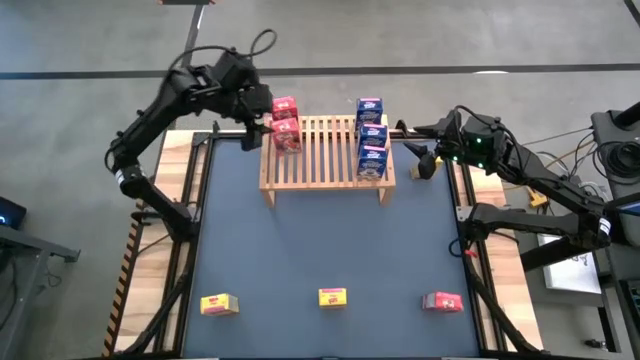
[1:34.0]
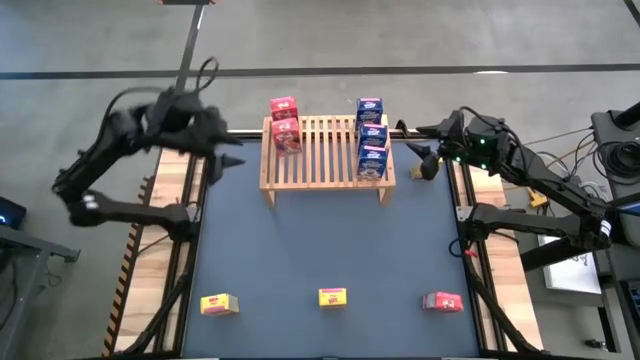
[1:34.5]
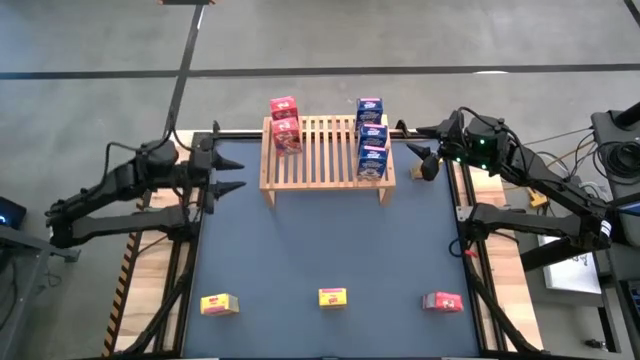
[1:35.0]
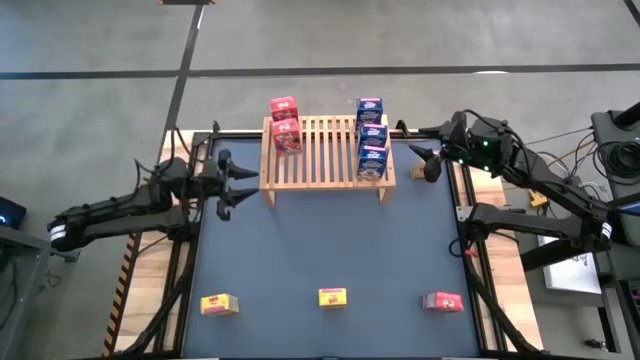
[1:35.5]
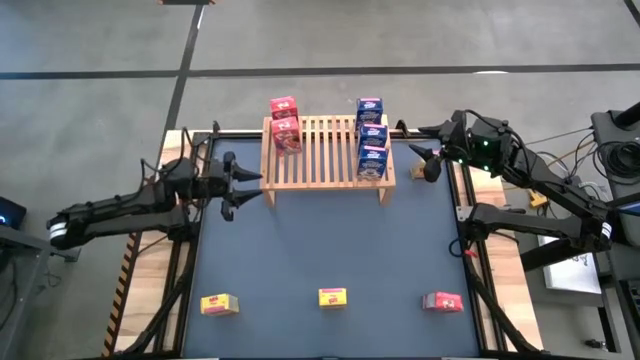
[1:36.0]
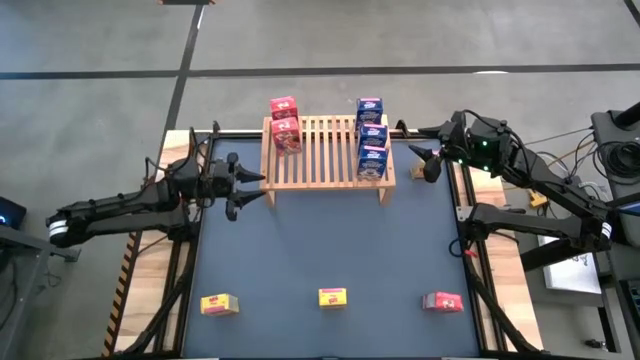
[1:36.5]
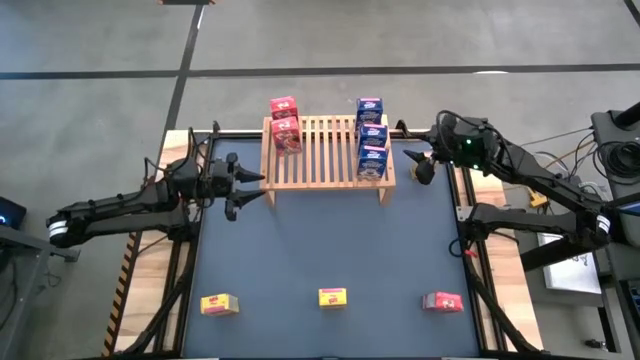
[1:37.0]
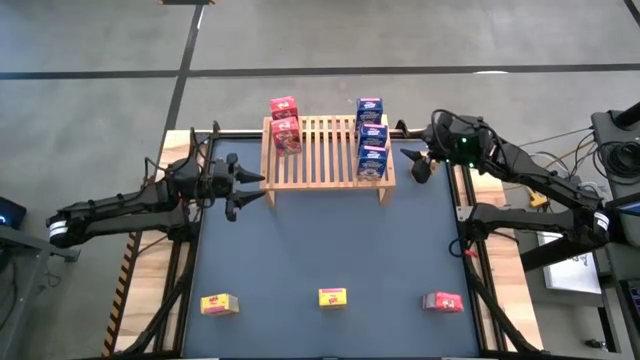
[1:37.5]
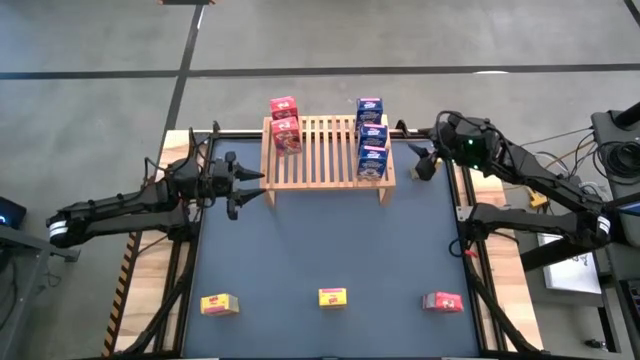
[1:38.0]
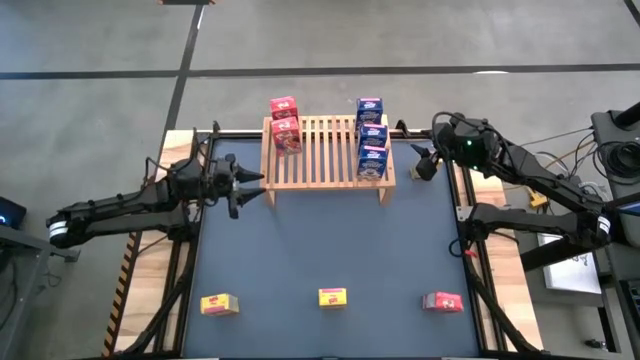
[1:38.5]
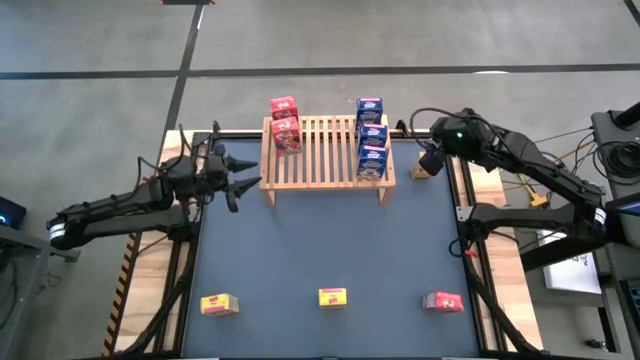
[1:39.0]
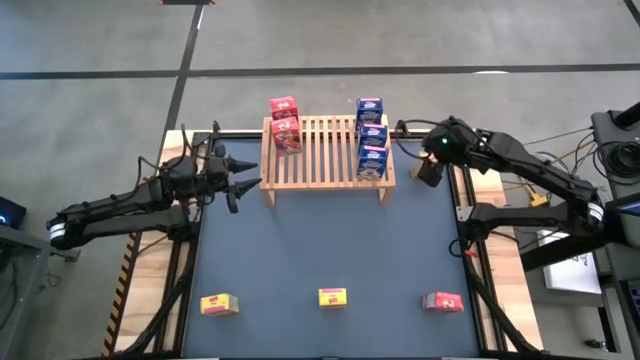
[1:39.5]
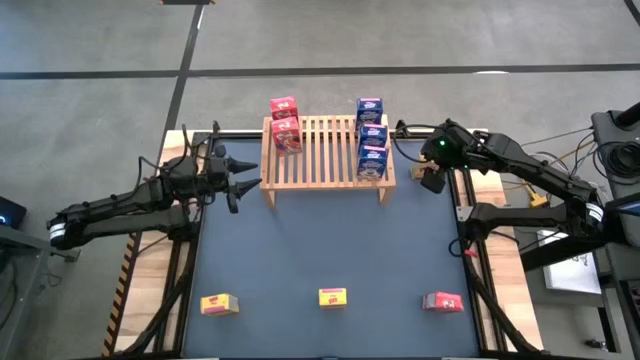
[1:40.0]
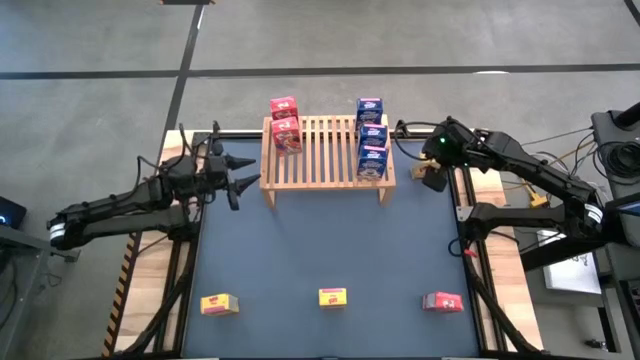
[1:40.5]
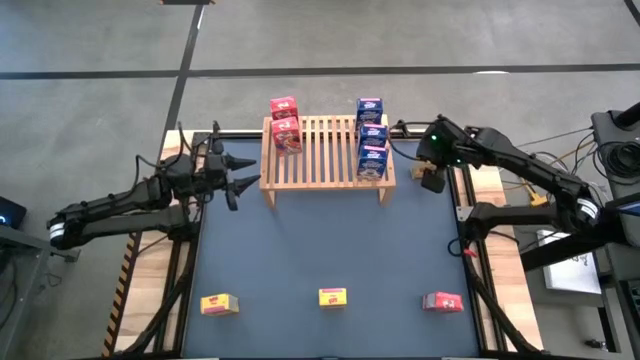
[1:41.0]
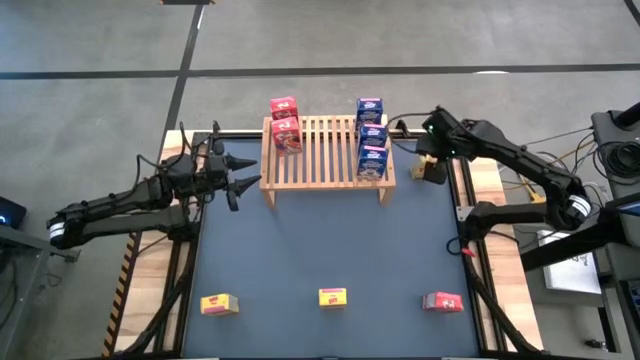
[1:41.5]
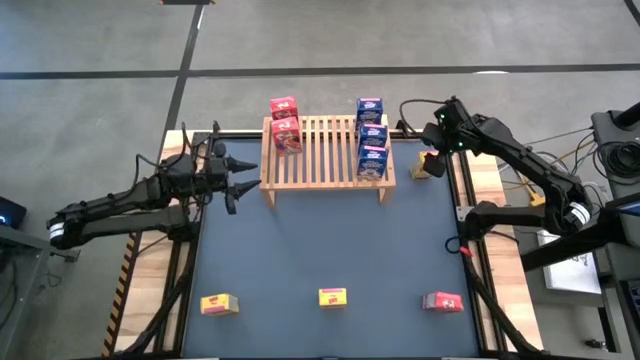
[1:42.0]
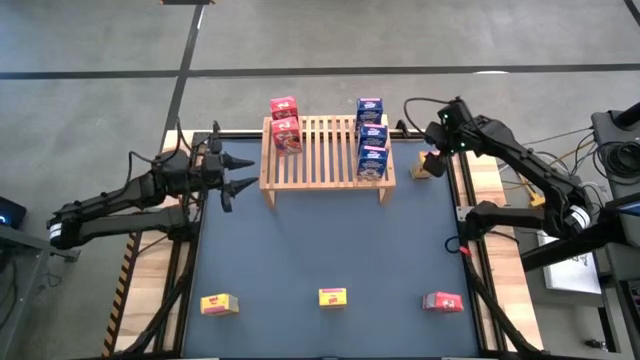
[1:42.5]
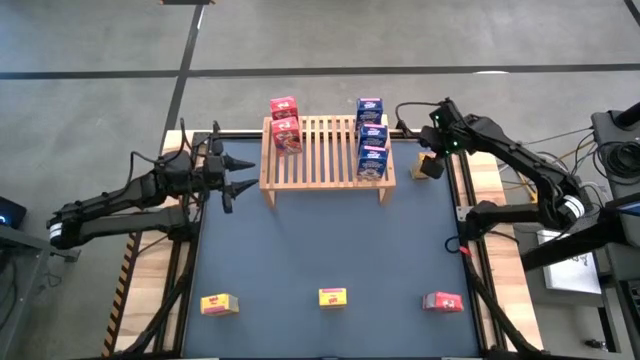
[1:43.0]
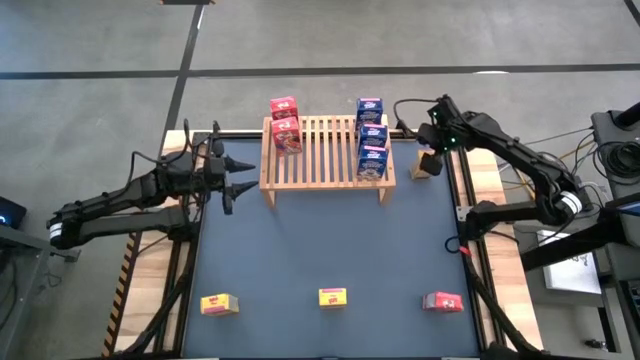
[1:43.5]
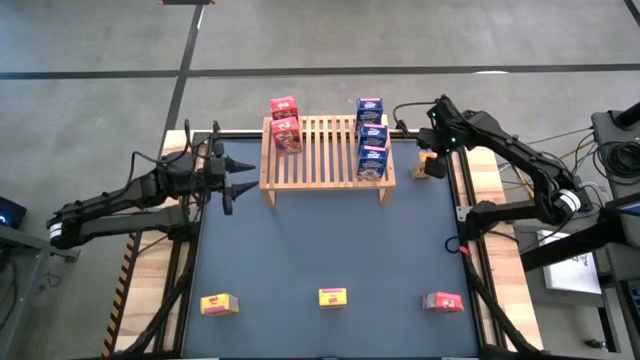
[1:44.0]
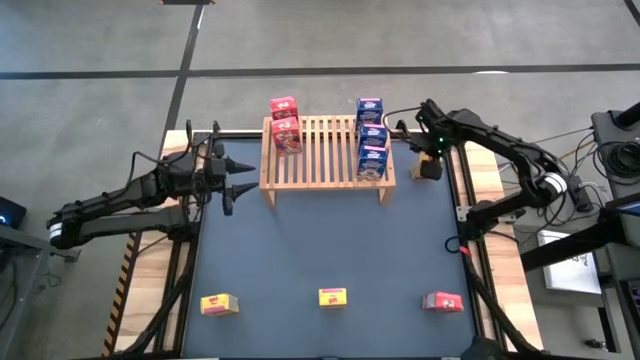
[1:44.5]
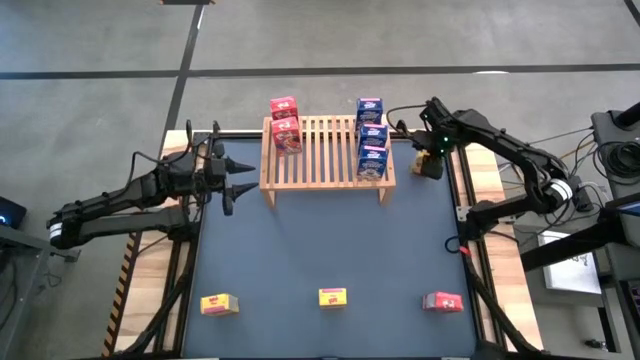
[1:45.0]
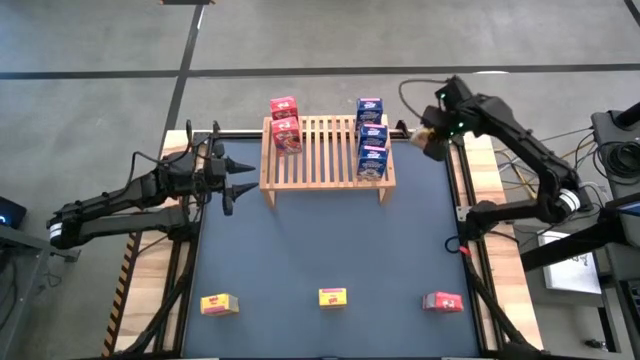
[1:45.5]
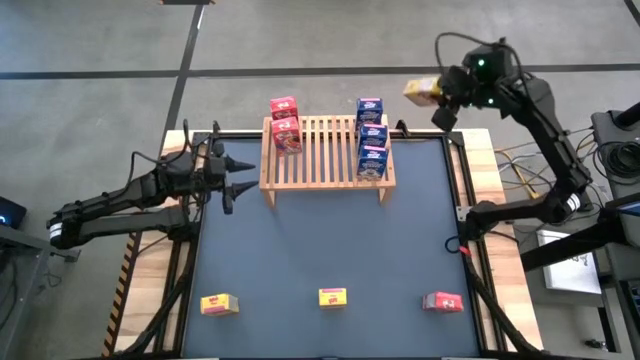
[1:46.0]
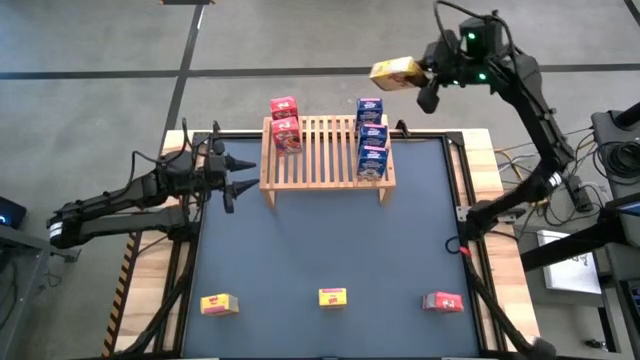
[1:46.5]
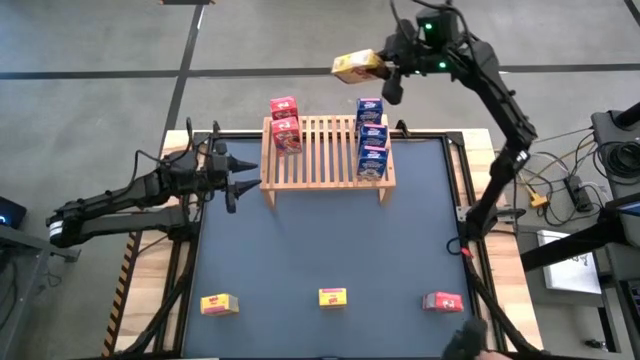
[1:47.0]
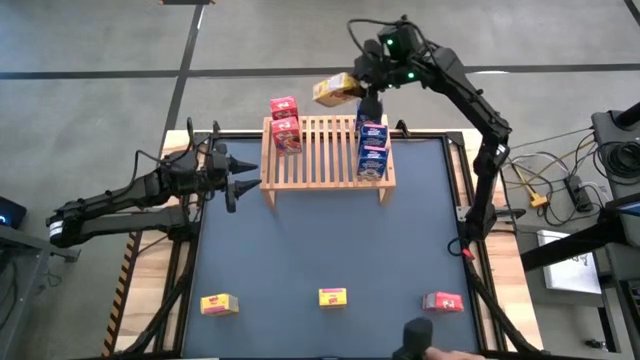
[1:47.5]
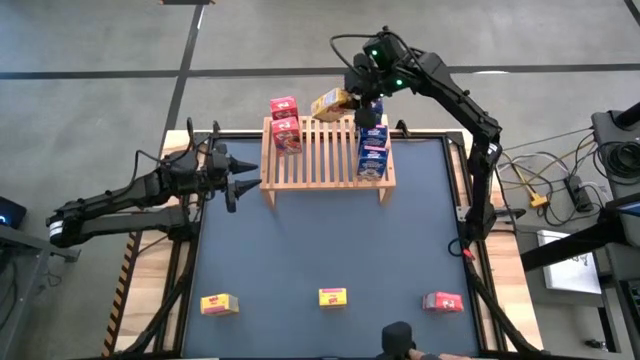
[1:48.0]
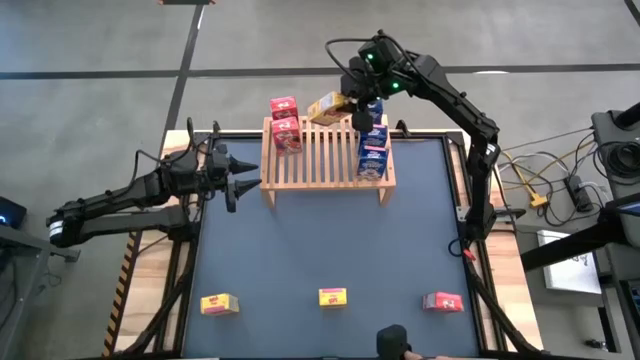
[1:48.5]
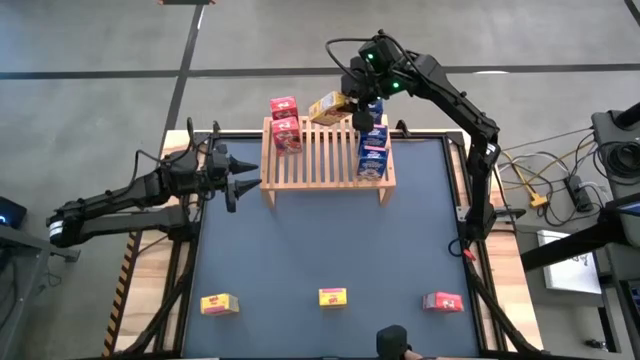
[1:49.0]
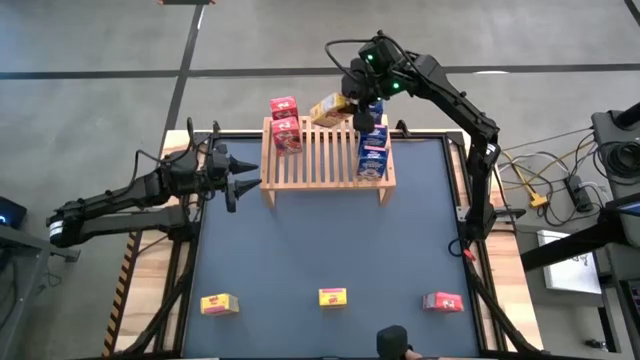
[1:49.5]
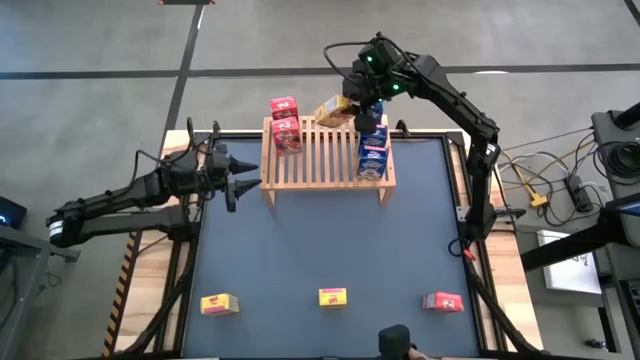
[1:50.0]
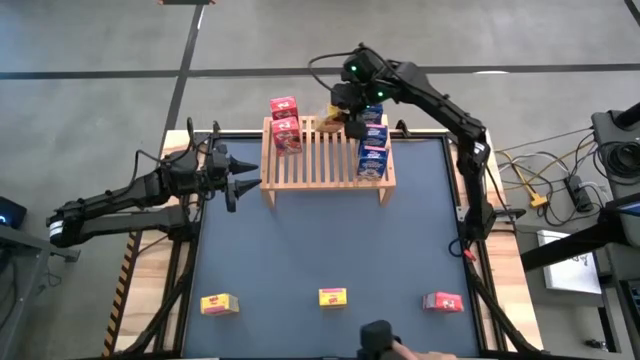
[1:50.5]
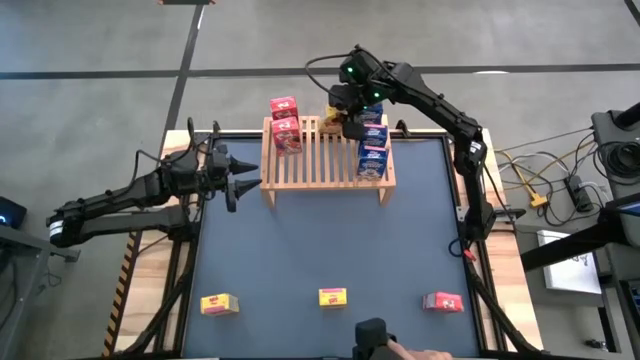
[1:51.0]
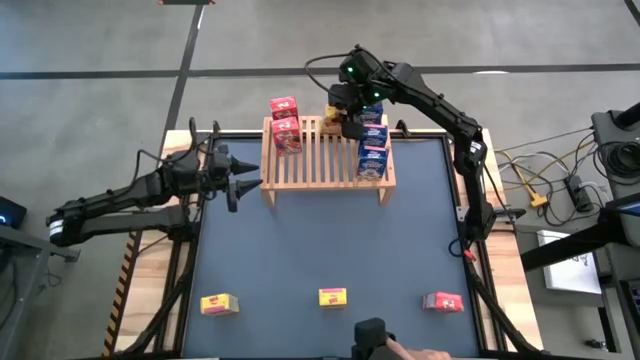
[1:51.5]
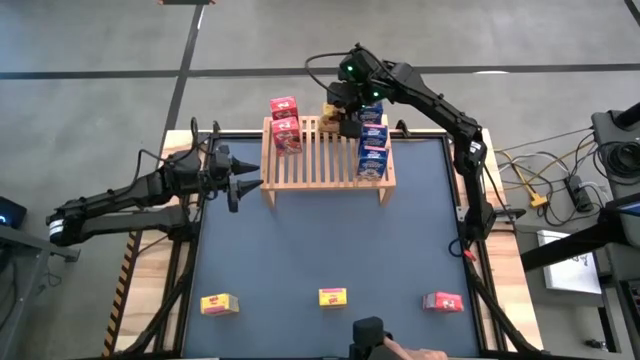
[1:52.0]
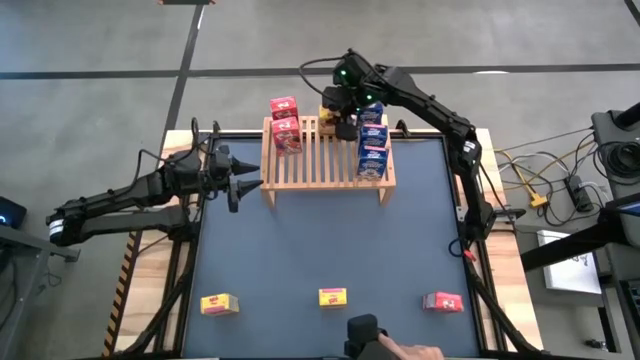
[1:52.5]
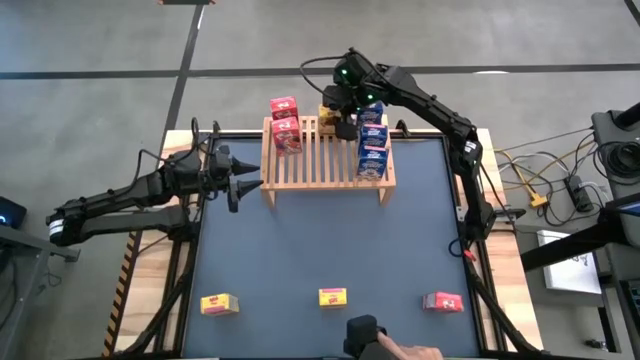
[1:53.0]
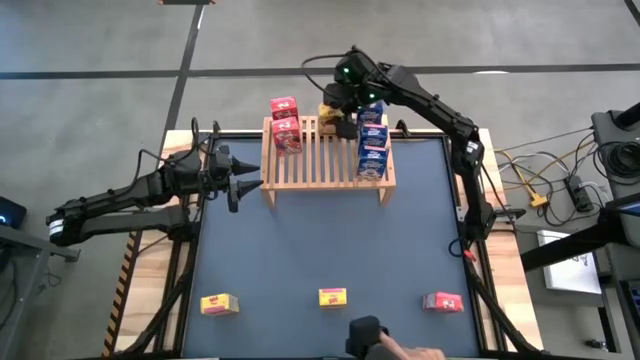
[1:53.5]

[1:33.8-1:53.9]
Task: Stack cereal on shelf
Put the top yellow cereal box on the shelf
